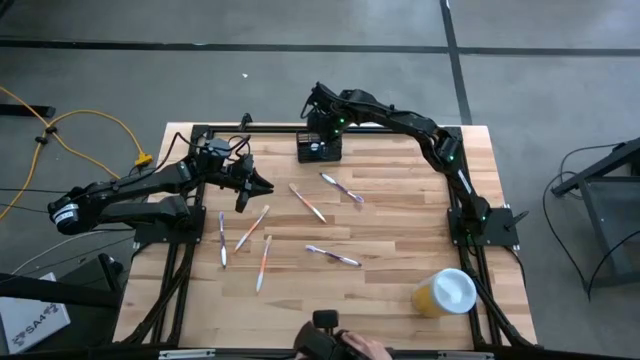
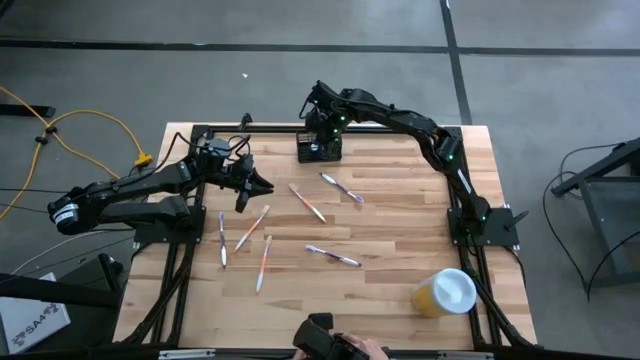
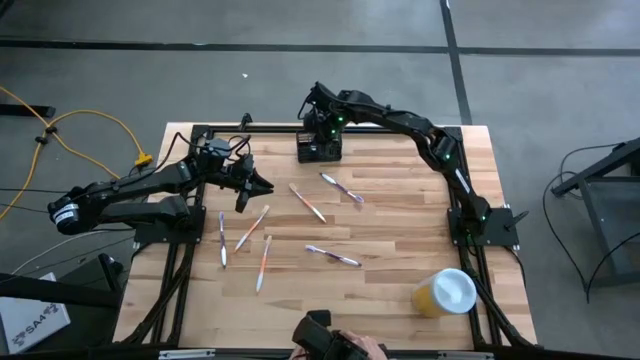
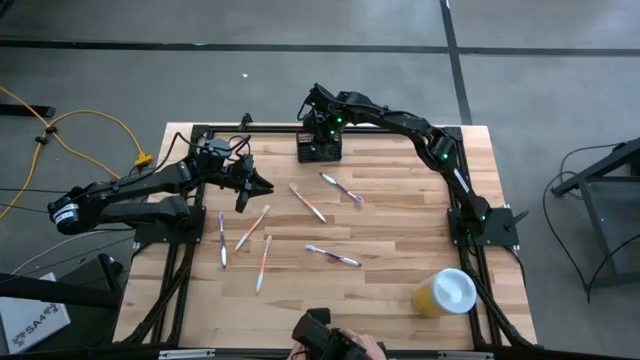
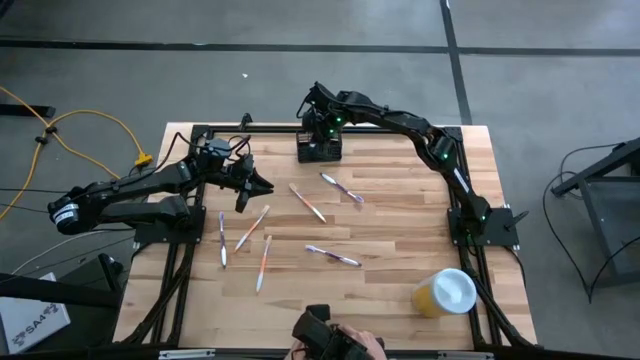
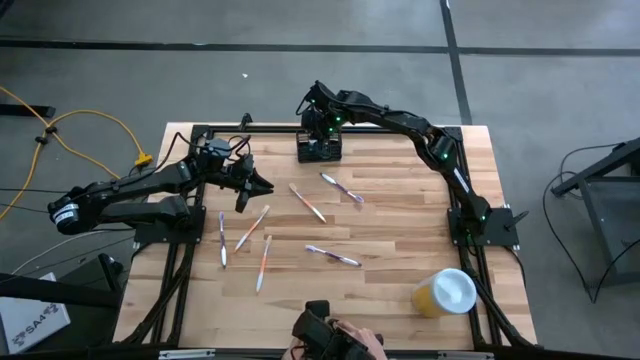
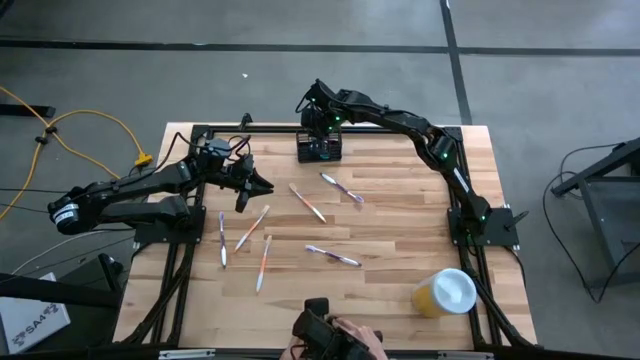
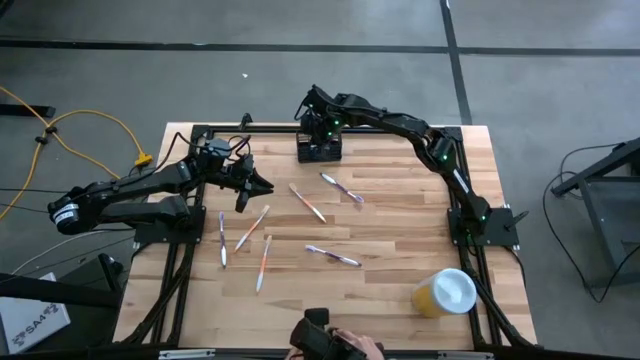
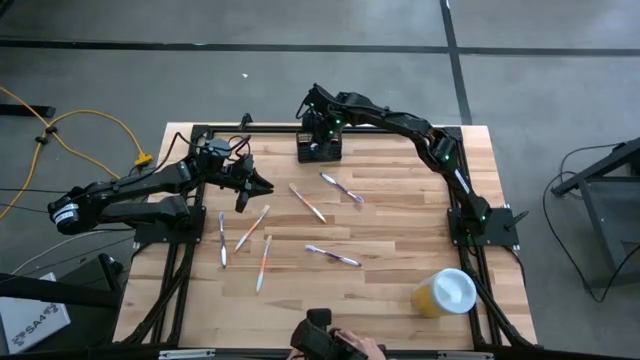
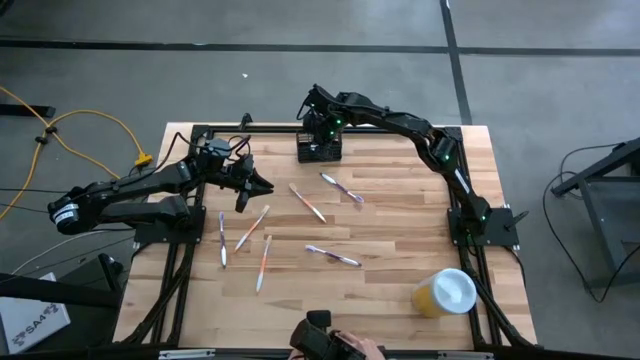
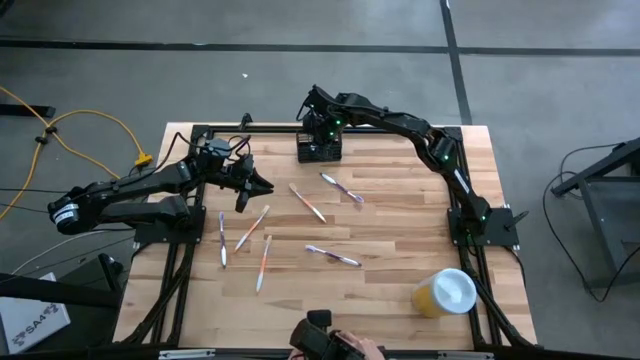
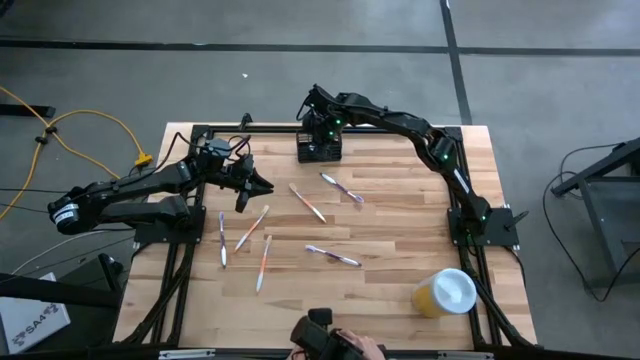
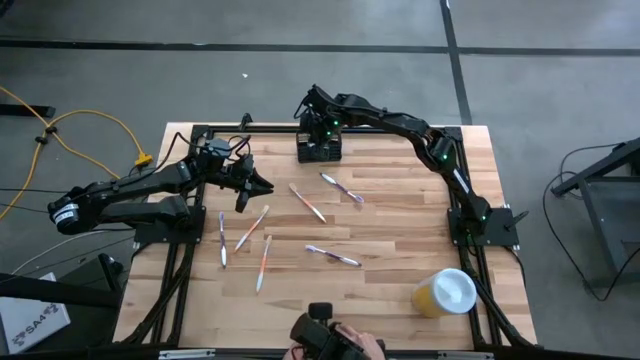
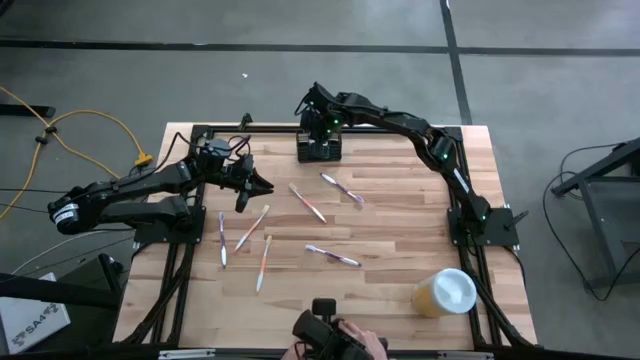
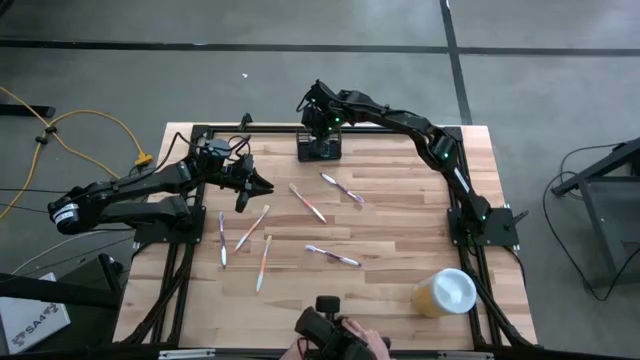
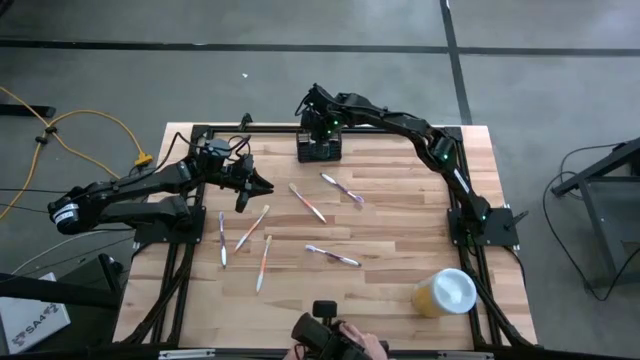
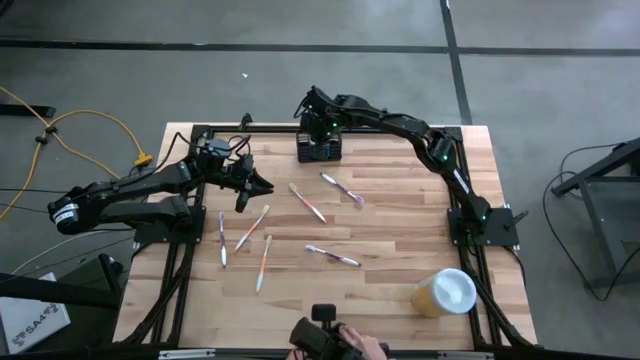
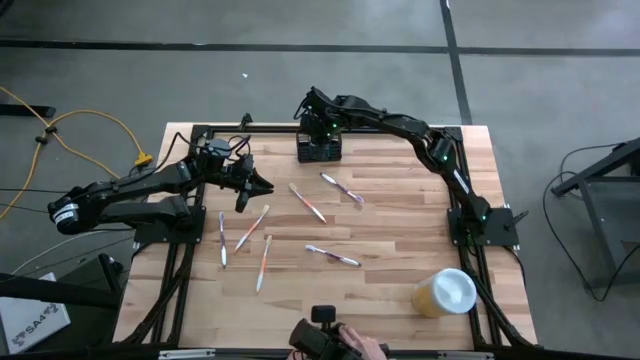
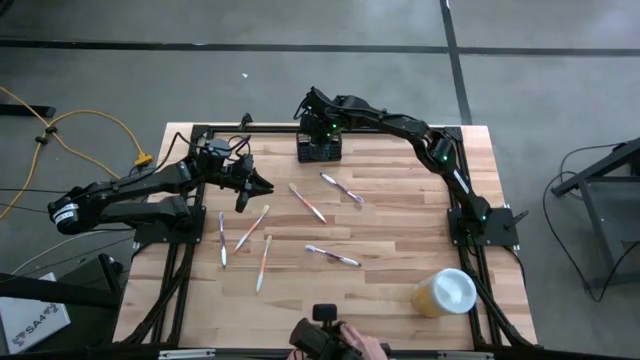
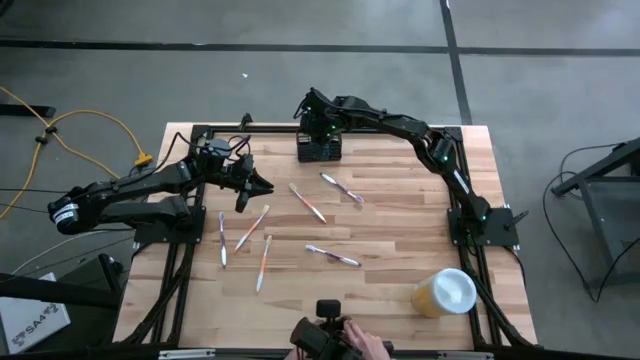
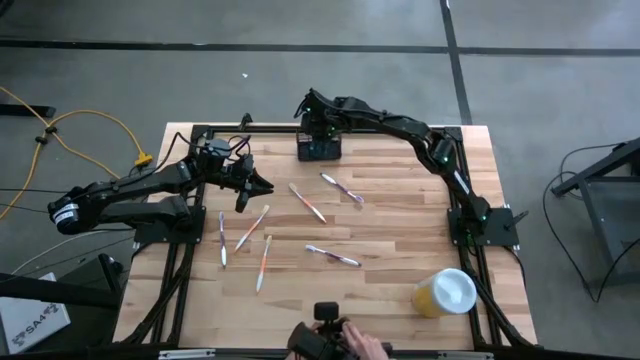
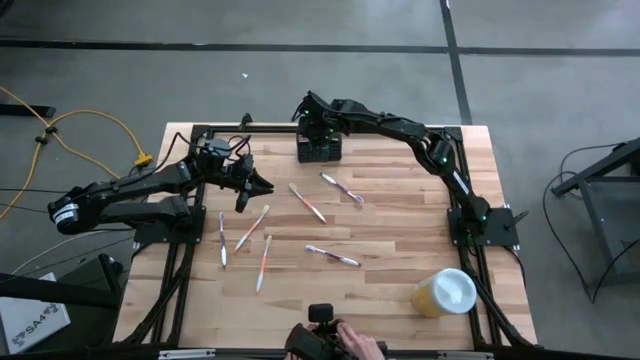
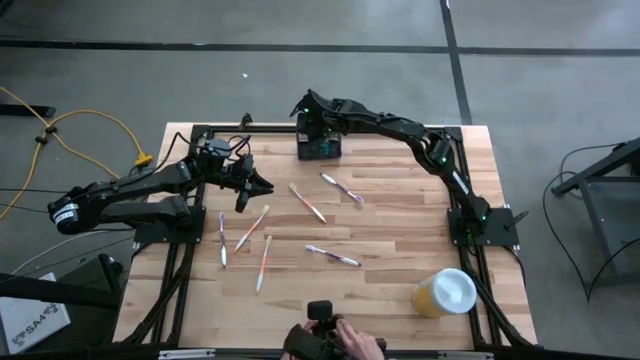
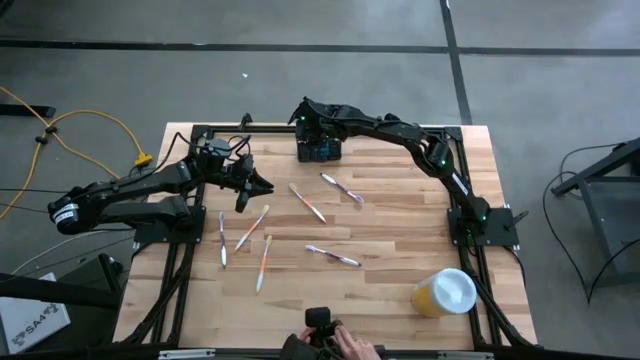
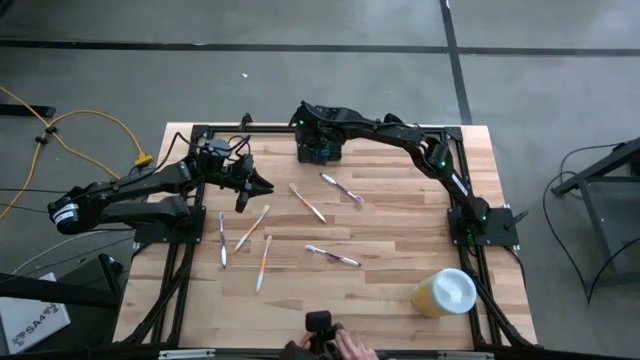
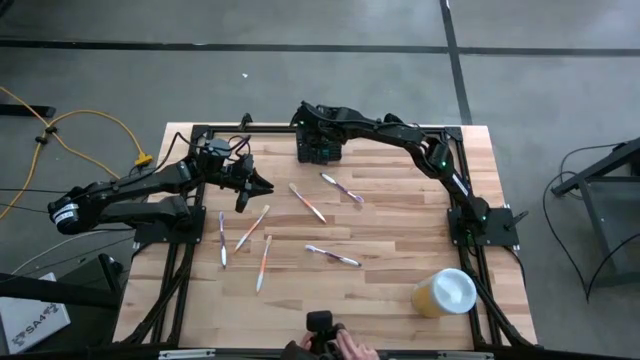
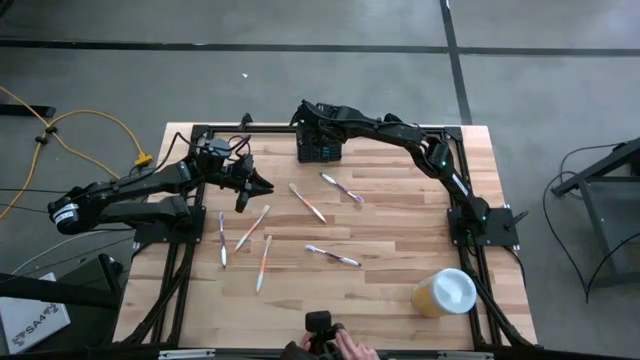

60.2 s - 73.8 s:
Task: Pick & Place toothbrushing station
Adjust the mouthwash into the wire organizer

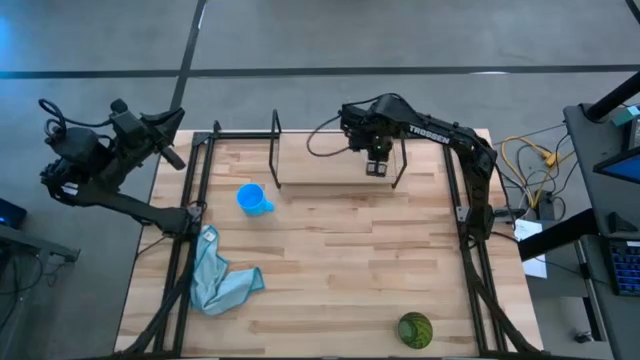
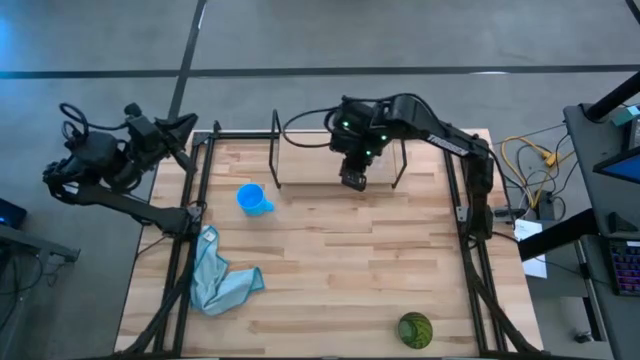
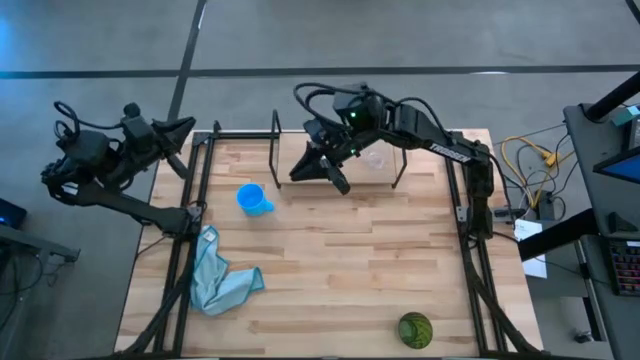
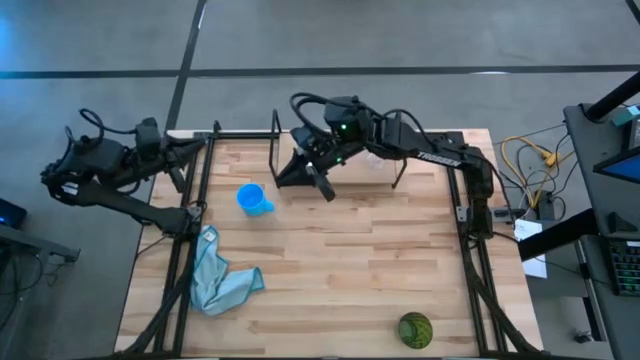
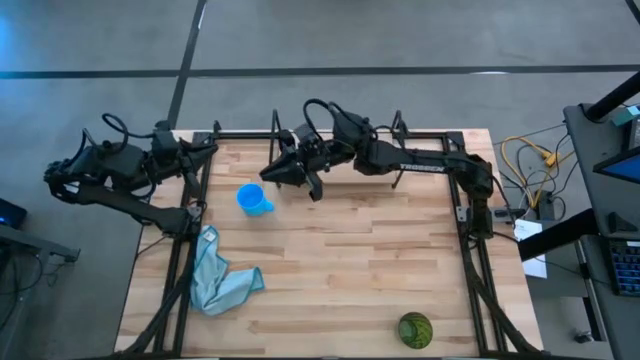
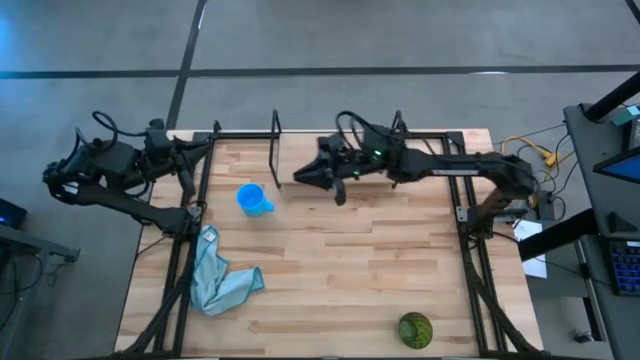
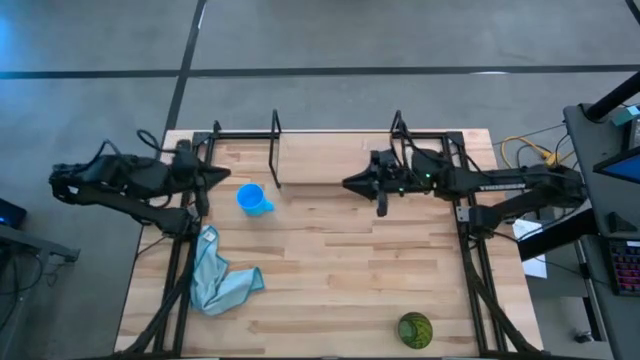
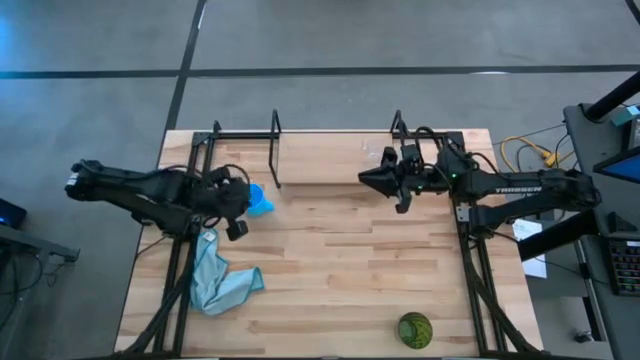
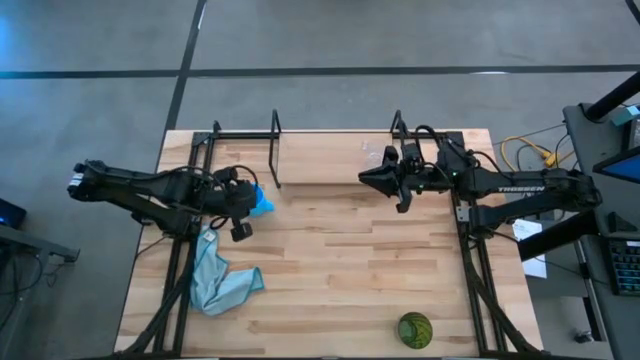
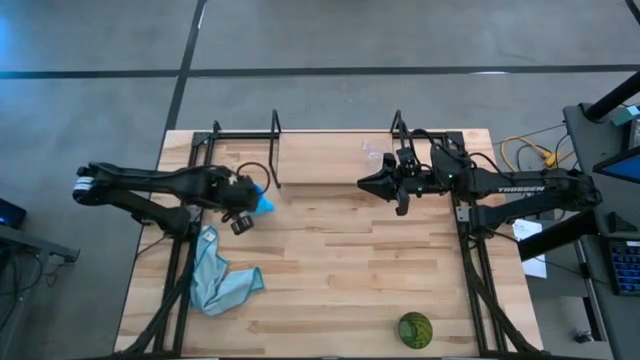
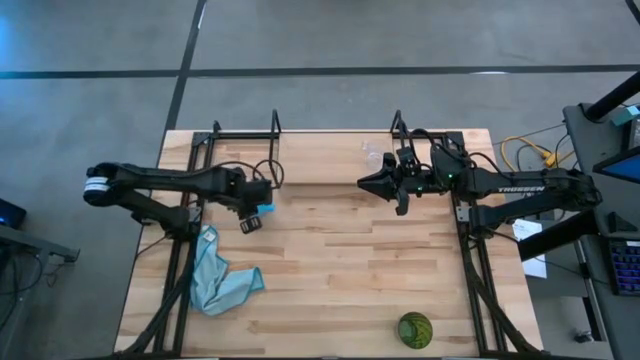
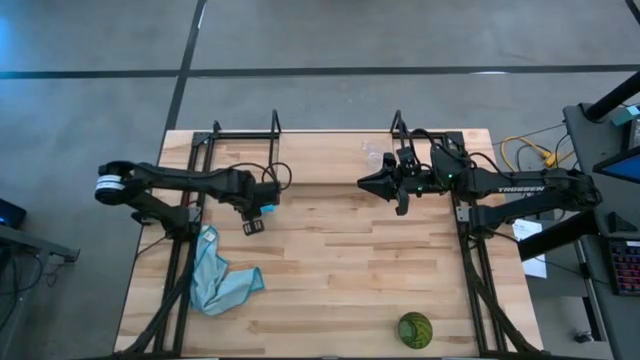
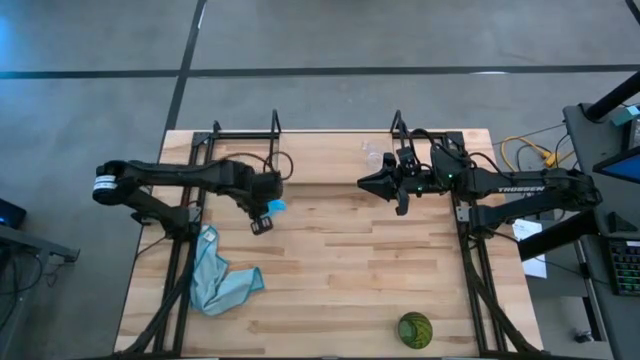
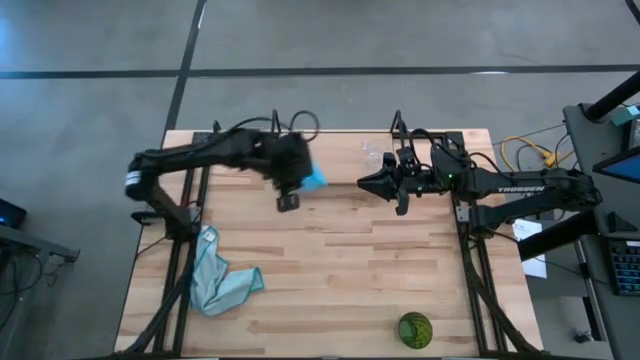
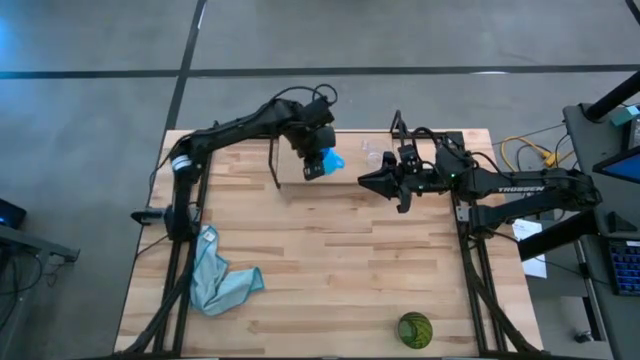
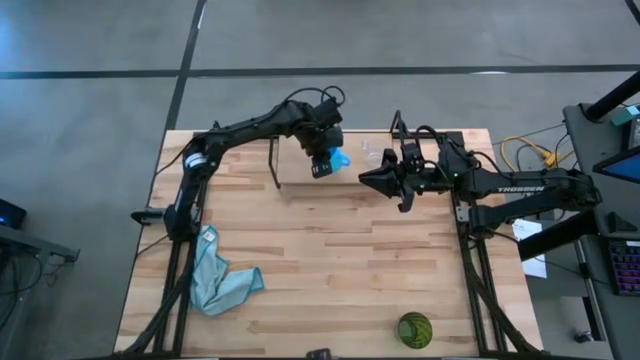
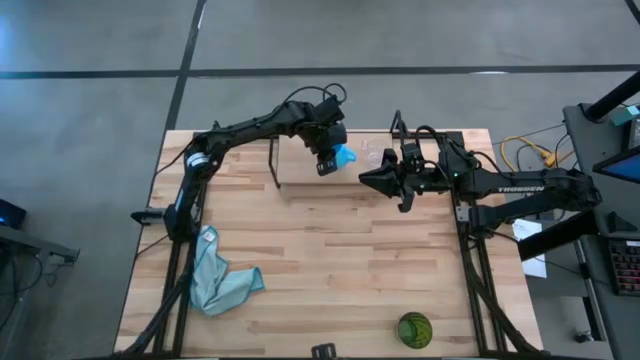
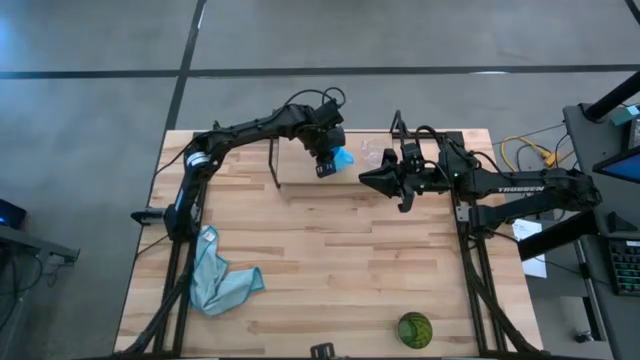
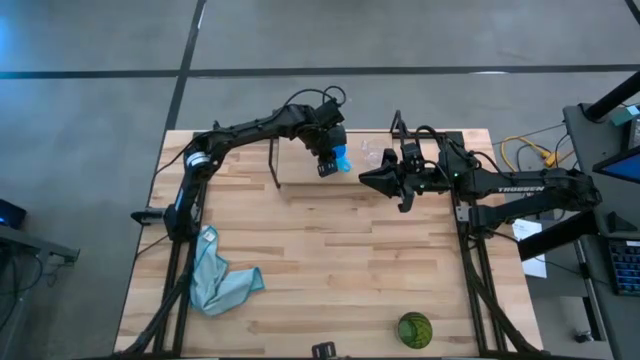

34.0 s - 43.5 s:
Task: Stack small to large cups/mugs on shelf
Put the blue mug on the shelf
